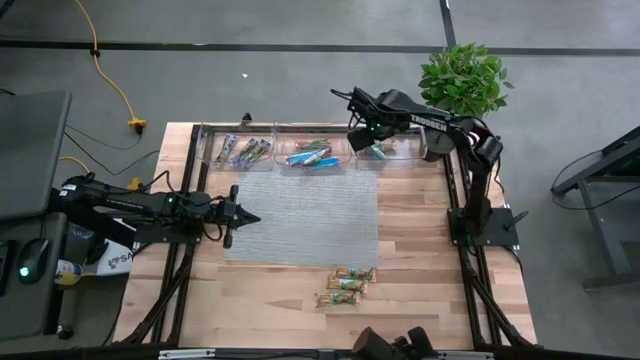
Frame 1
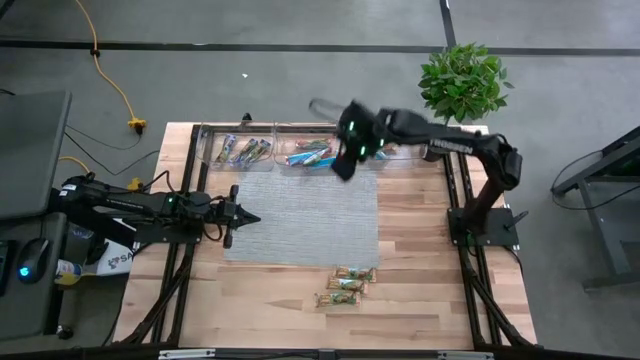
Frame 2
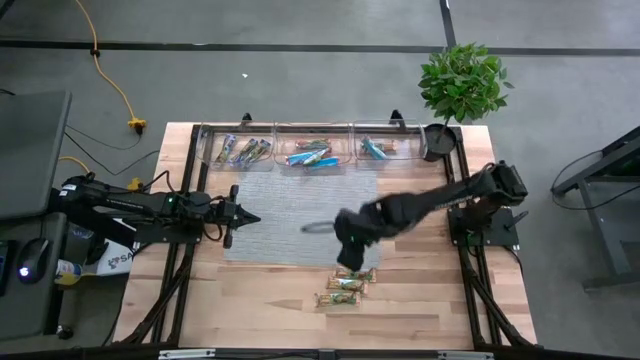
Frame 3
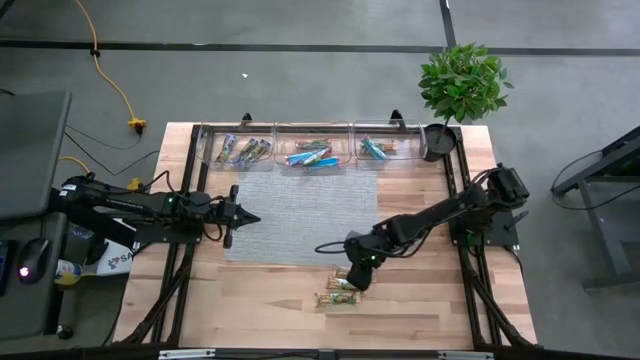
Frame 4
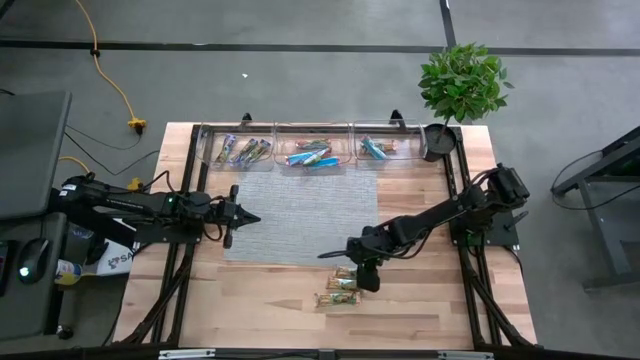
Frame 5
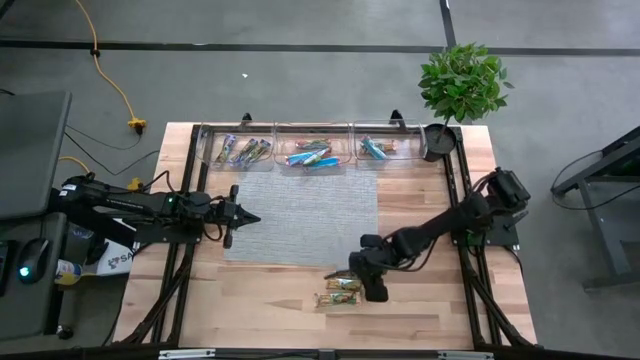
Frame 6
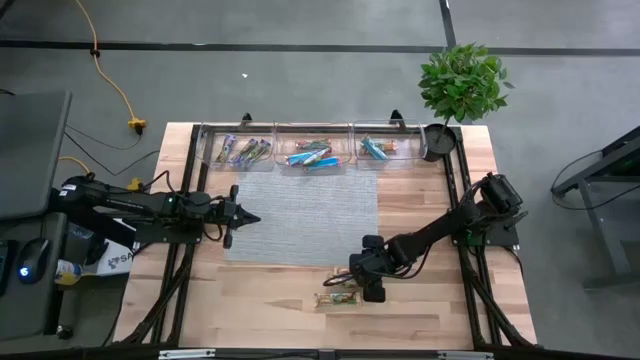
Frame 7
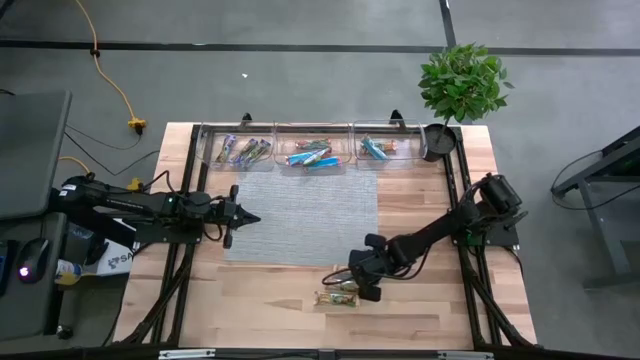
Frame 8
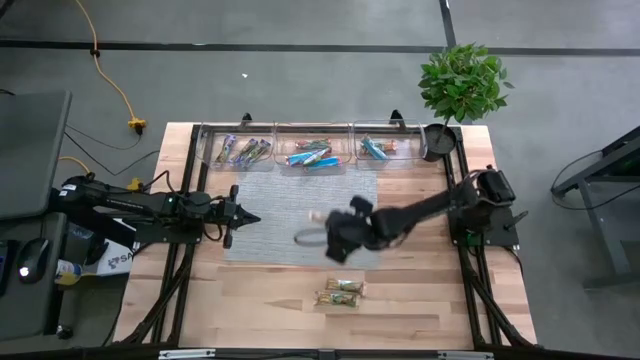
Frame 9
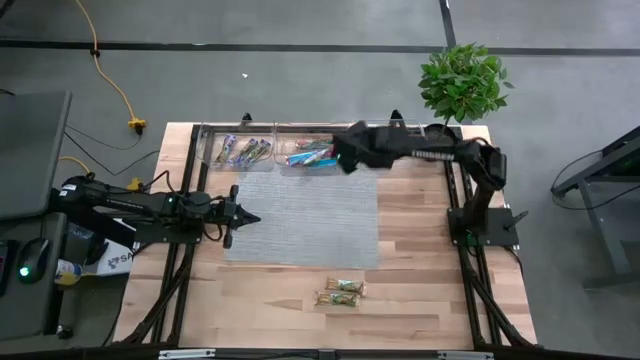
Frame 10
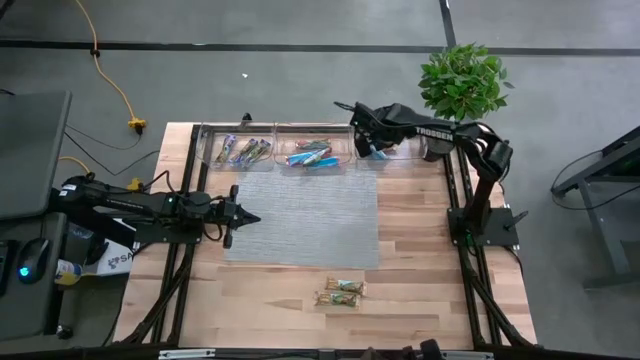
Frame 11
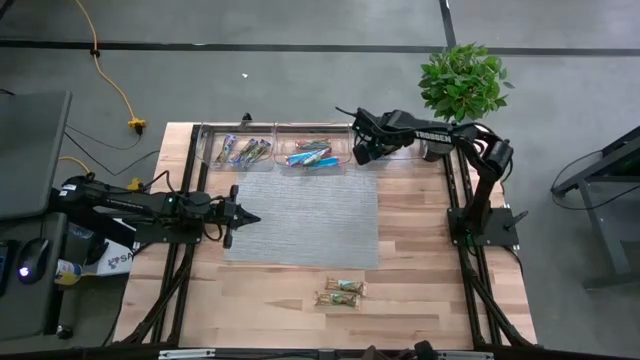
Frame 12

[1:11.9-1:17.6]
Task: Pick and place Granola Bars by type
Put the yellow granola bar into the right transparent bin

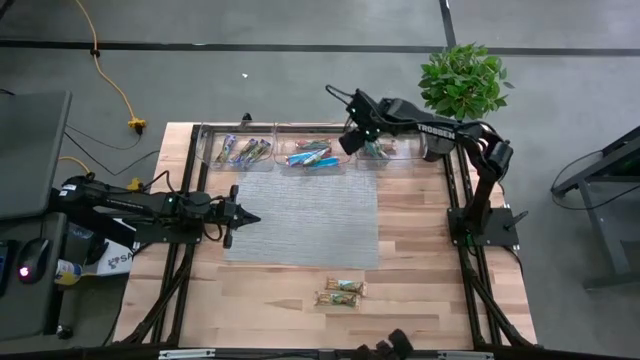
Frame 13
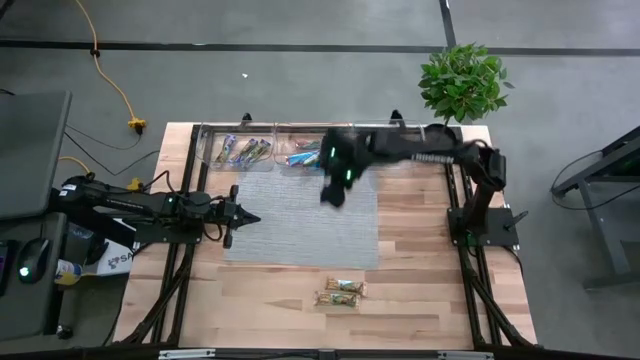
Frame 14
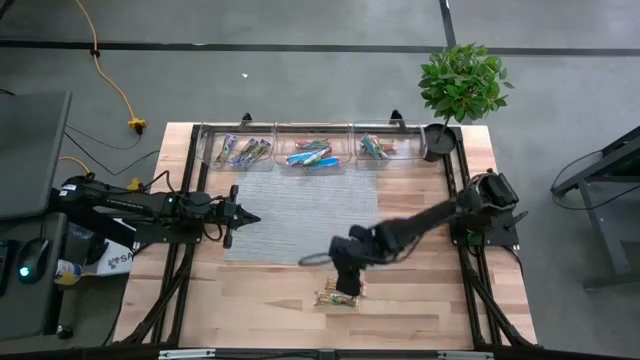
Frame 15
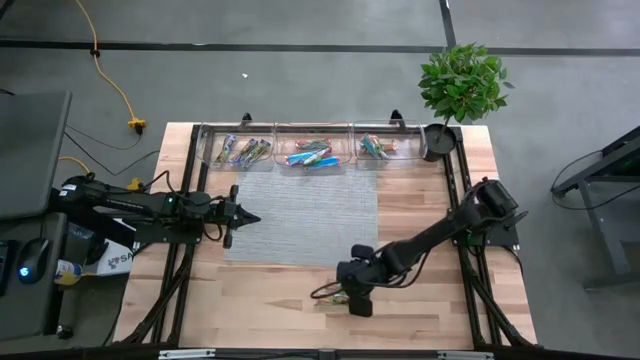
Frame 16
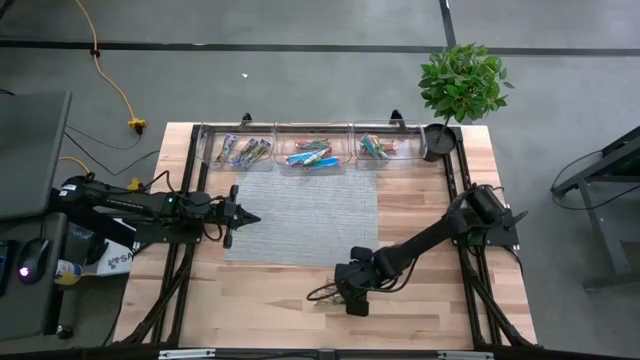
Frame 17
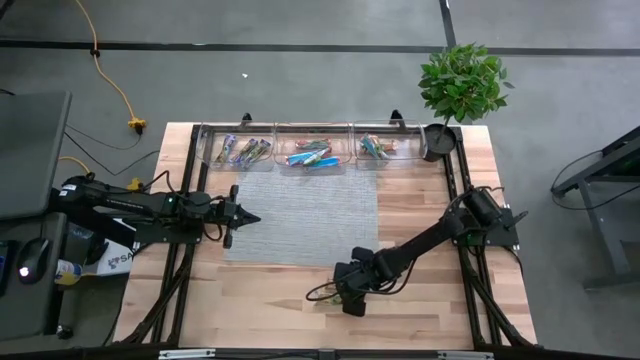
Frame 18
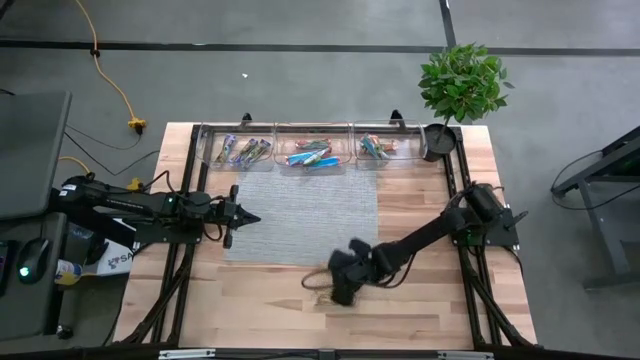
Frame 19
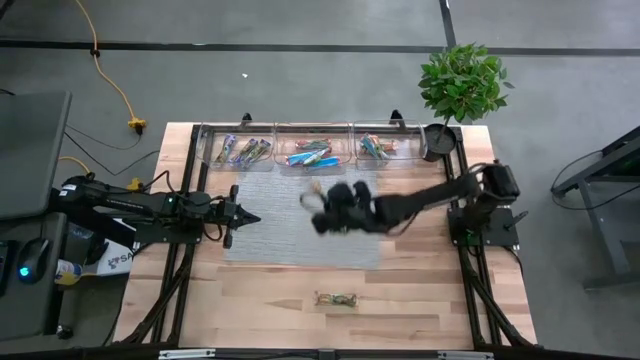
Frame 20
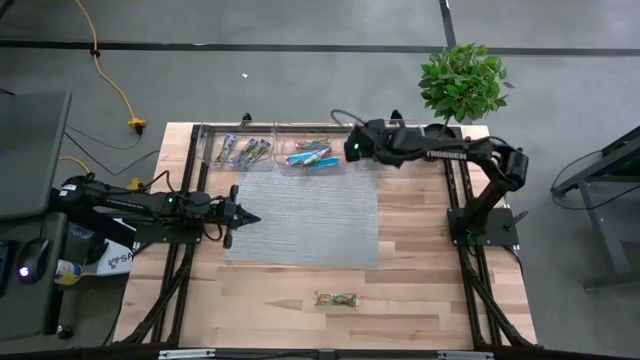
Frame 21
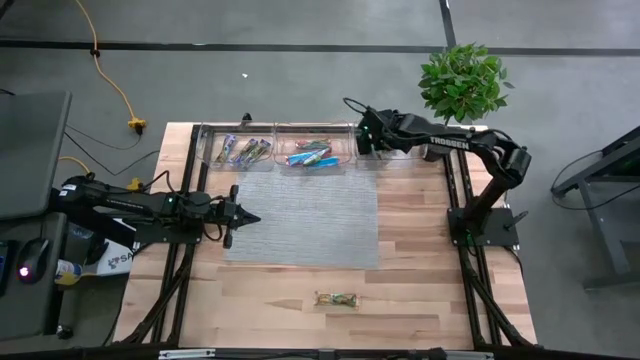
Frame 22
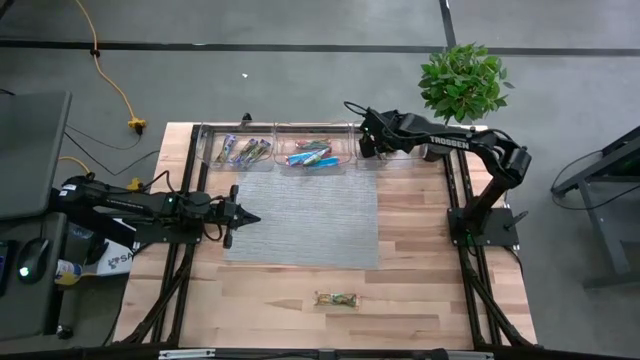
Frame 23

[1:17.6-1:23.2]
Put the yellow granola bar into the right transparent bin

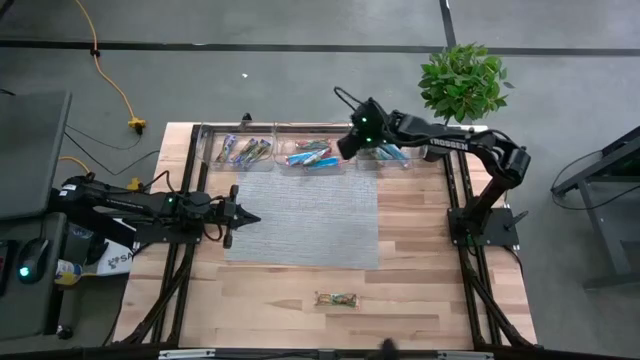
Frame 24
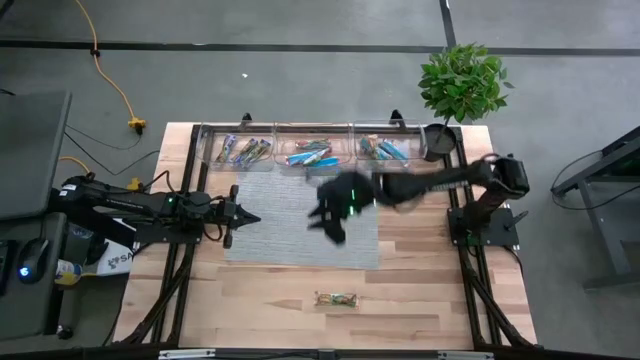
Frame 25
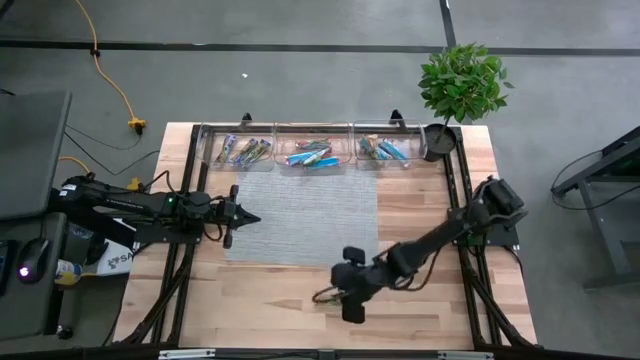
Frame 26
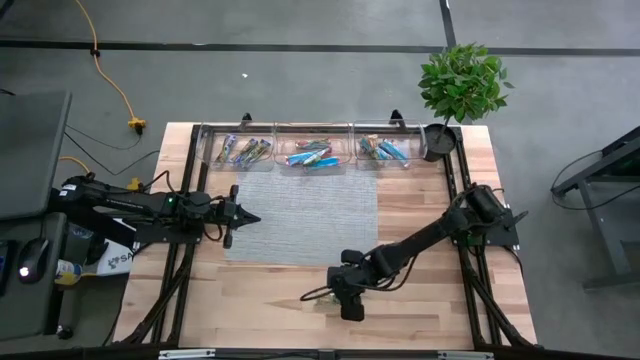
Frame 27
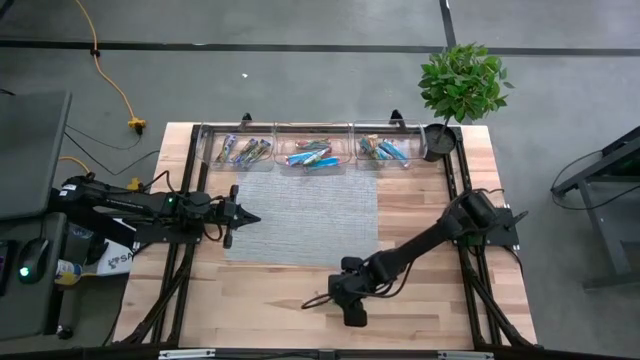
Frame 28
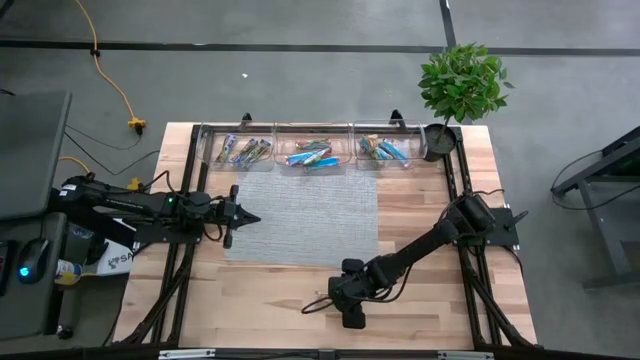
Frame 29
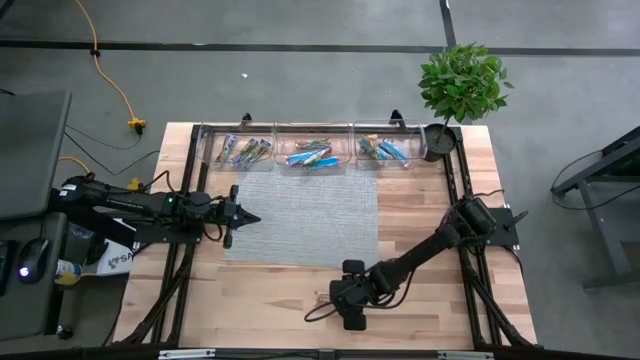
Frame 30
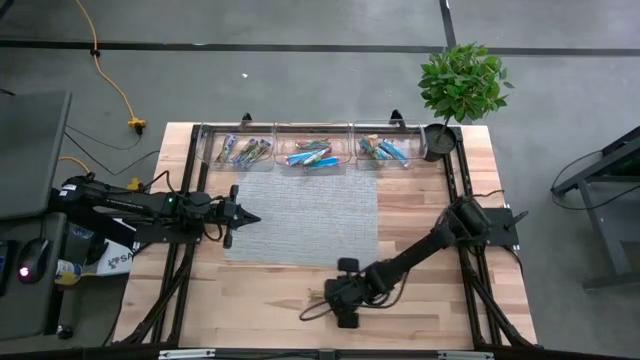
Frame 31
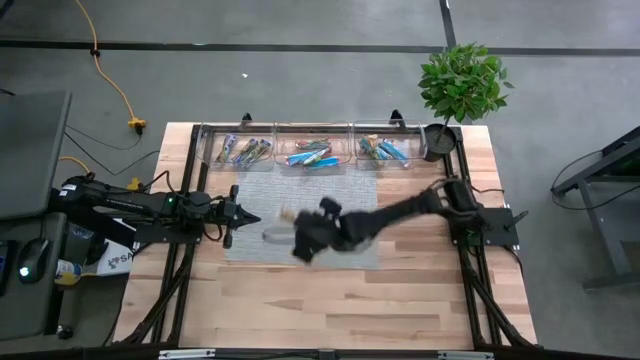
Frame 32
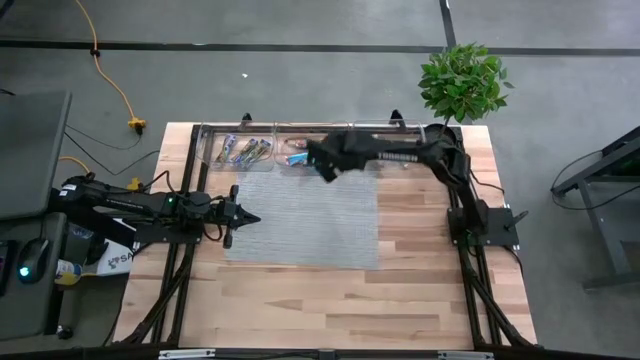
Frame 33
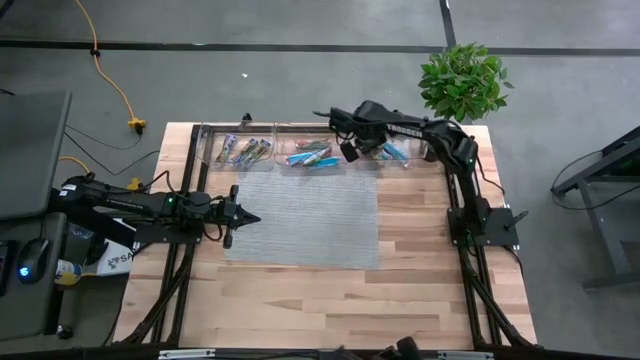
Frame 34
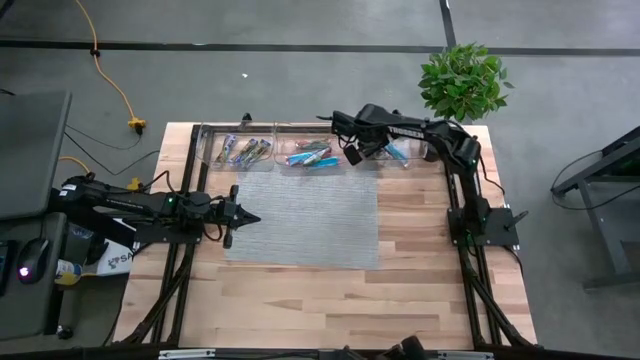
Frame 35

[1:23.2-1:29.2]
Put the yellow granola bar into the right transparent bin

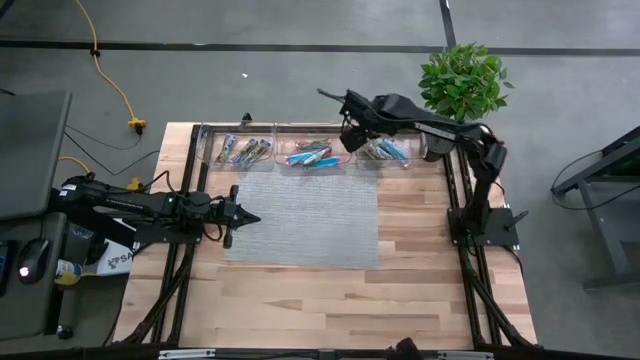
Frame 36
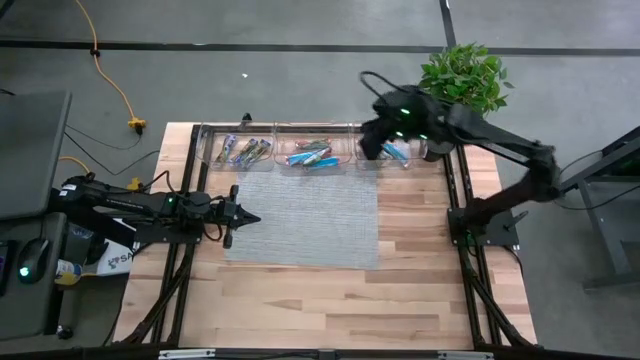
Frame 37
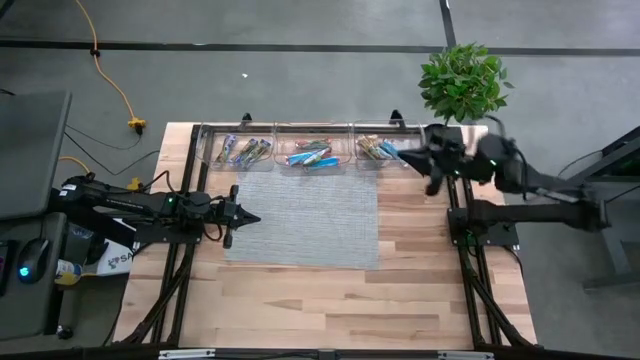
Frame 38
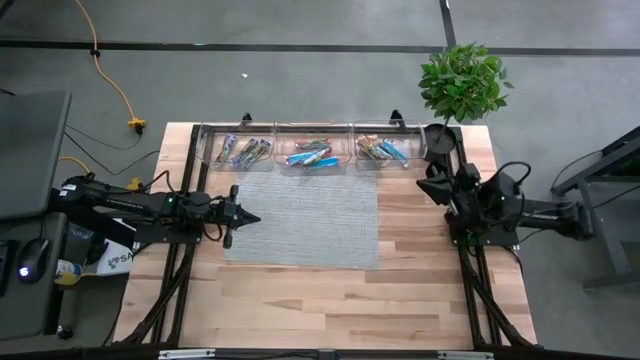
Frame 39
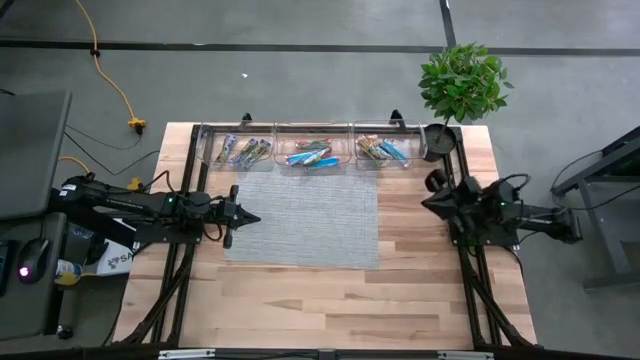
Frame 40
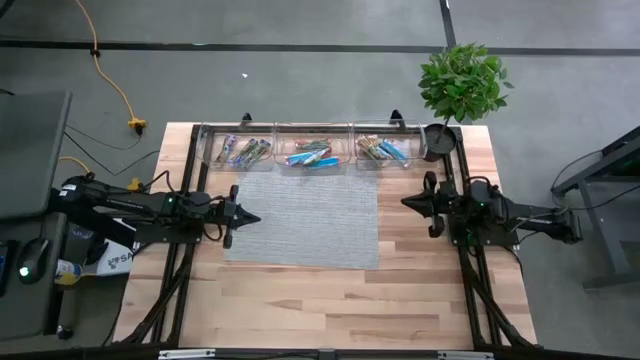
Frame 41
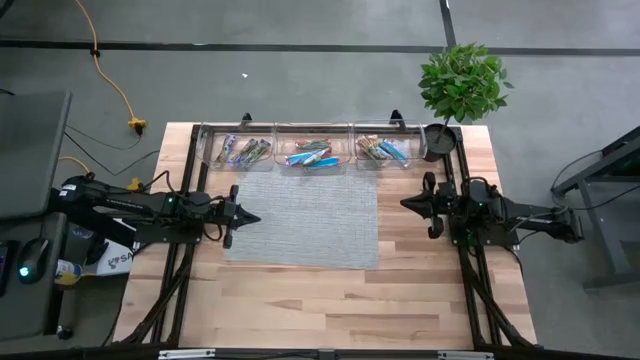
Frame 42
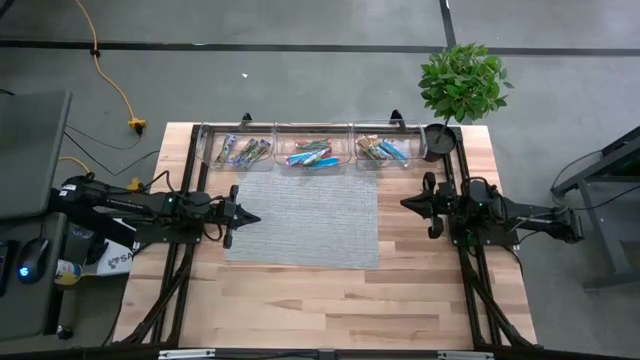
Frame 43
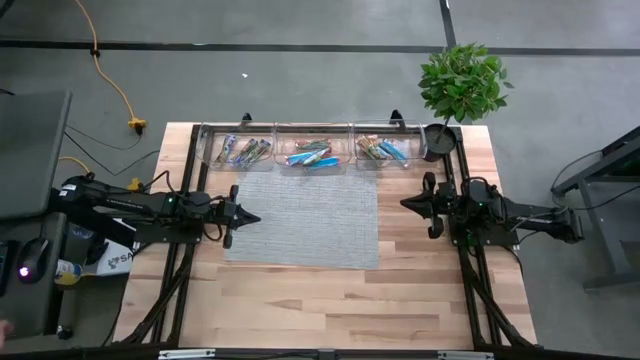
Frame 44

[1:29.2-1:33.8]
Return to Home Position
